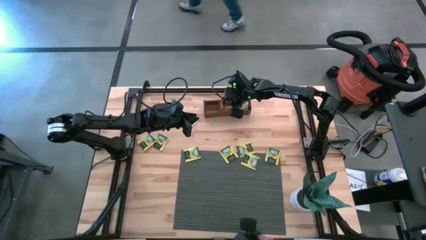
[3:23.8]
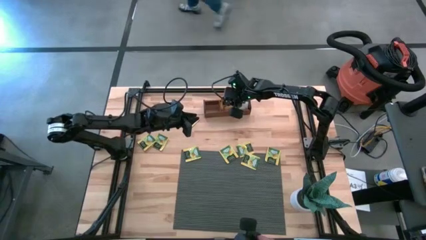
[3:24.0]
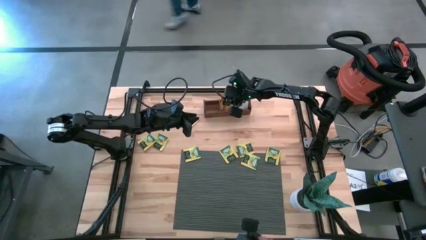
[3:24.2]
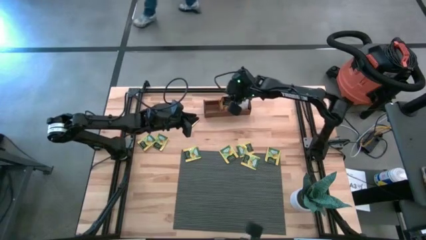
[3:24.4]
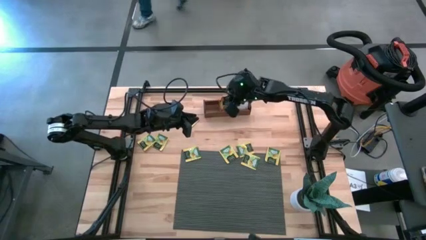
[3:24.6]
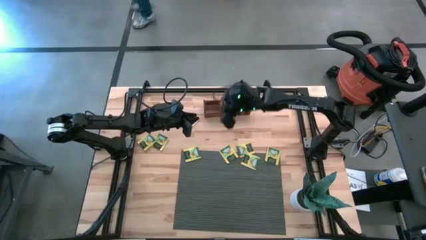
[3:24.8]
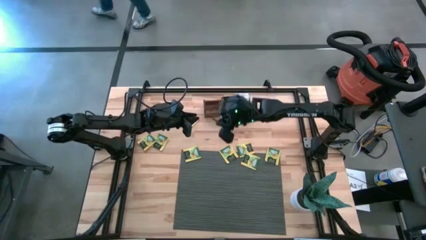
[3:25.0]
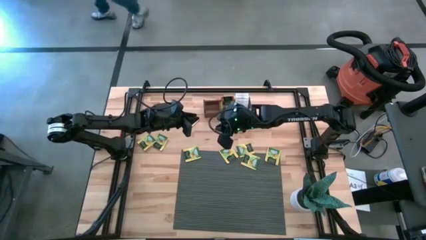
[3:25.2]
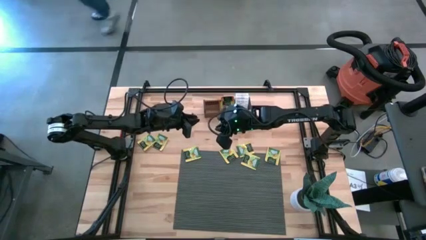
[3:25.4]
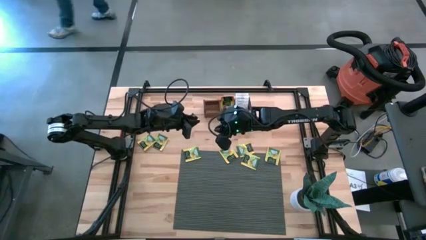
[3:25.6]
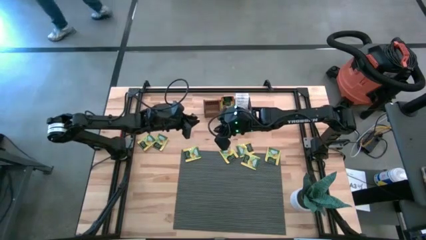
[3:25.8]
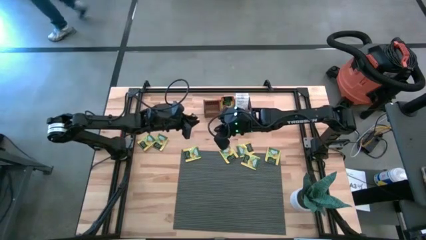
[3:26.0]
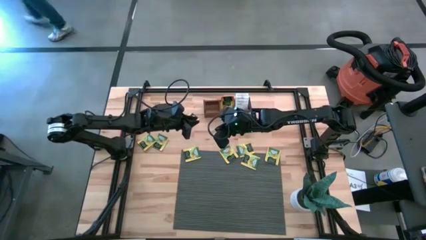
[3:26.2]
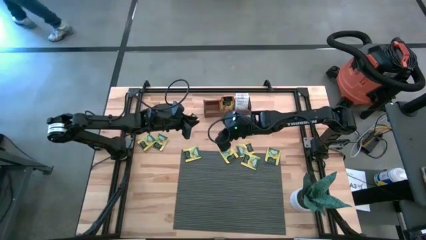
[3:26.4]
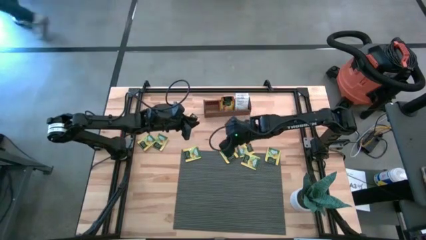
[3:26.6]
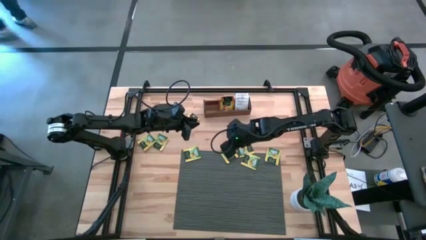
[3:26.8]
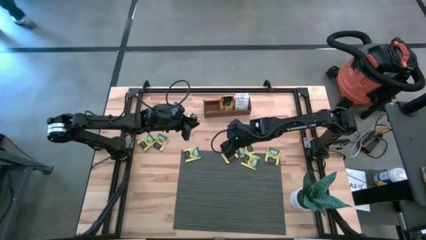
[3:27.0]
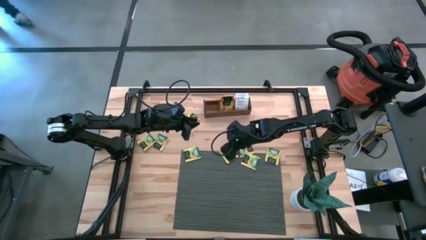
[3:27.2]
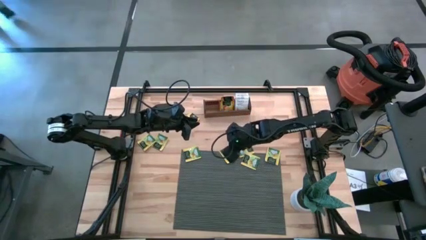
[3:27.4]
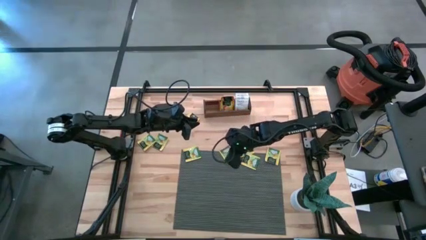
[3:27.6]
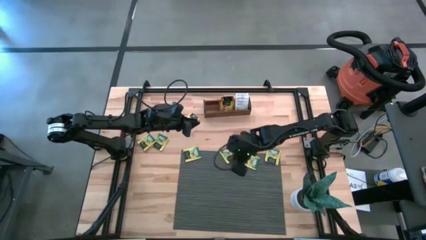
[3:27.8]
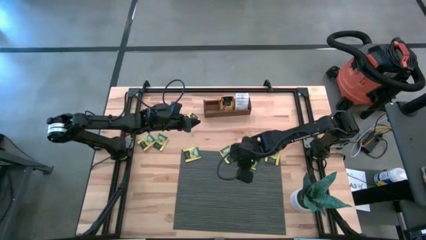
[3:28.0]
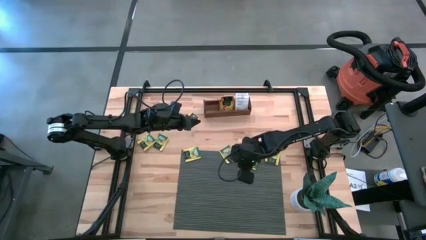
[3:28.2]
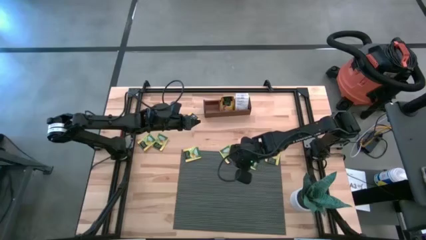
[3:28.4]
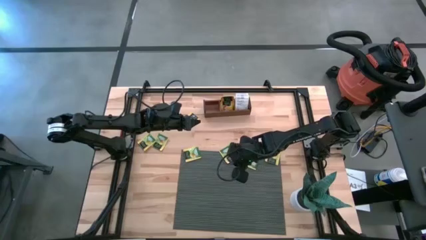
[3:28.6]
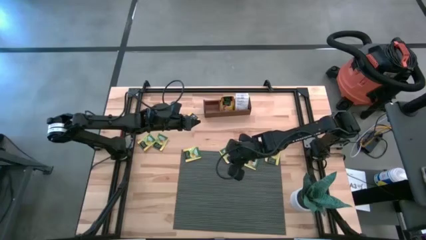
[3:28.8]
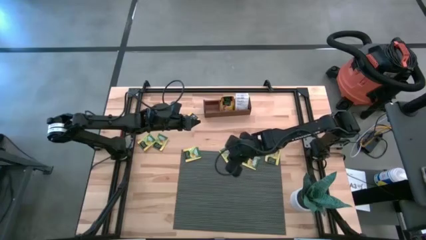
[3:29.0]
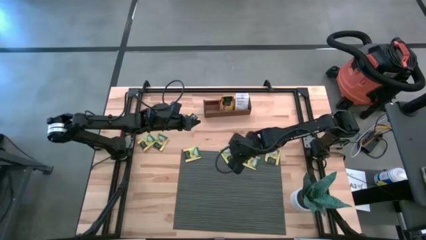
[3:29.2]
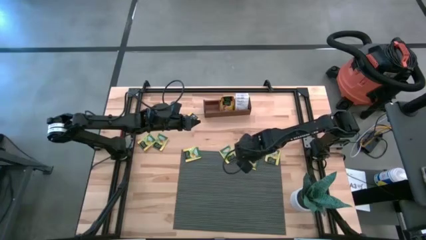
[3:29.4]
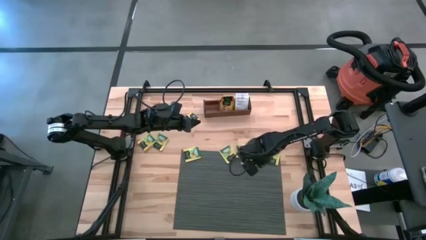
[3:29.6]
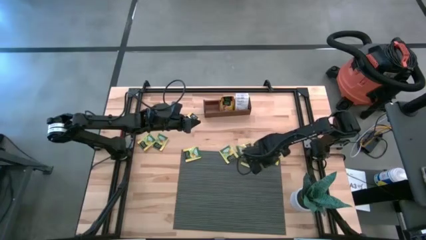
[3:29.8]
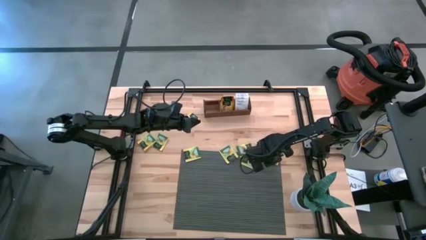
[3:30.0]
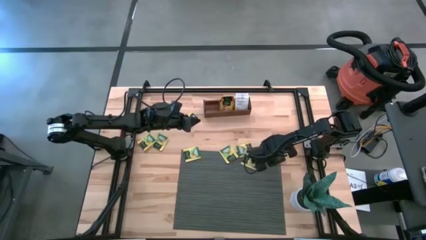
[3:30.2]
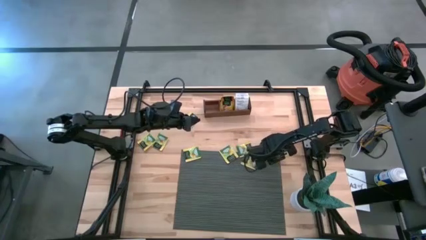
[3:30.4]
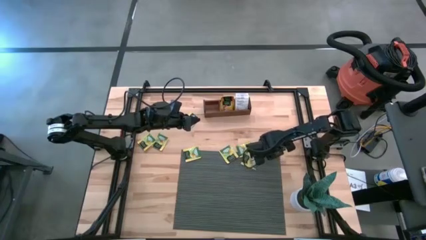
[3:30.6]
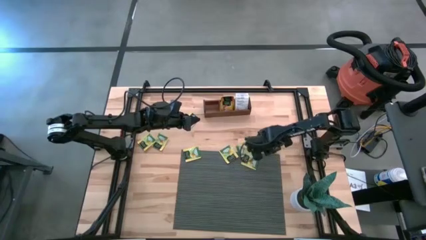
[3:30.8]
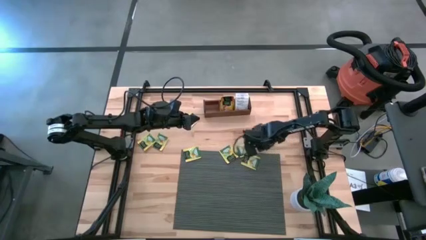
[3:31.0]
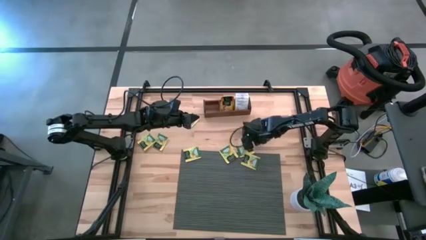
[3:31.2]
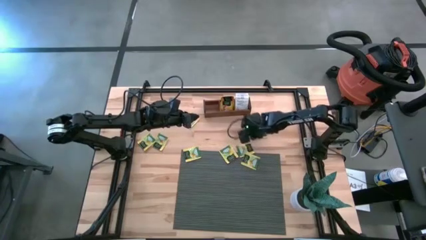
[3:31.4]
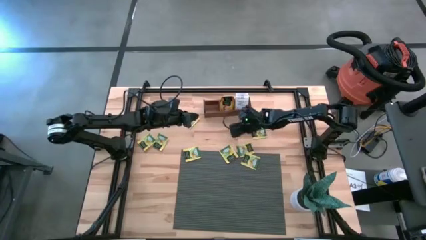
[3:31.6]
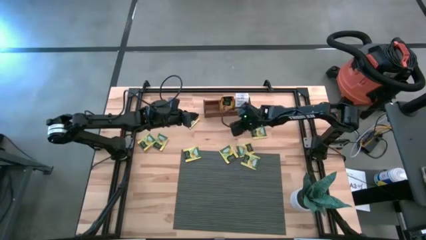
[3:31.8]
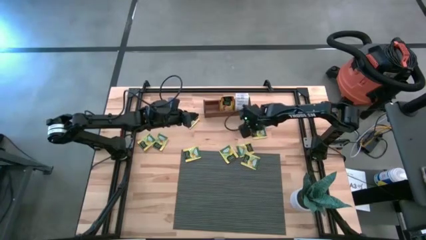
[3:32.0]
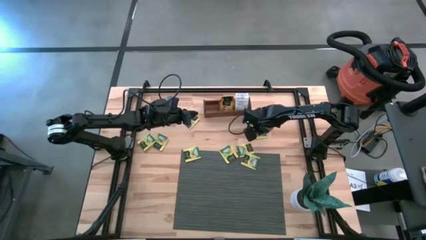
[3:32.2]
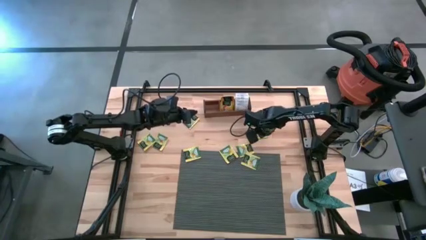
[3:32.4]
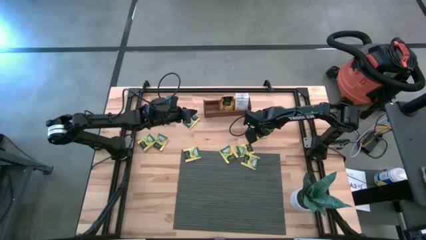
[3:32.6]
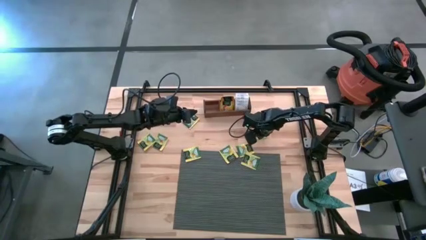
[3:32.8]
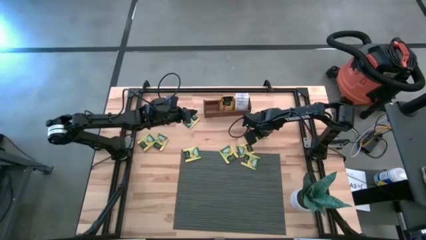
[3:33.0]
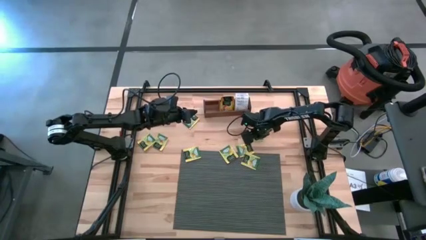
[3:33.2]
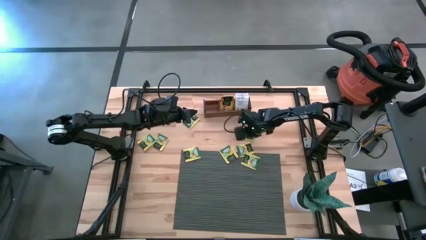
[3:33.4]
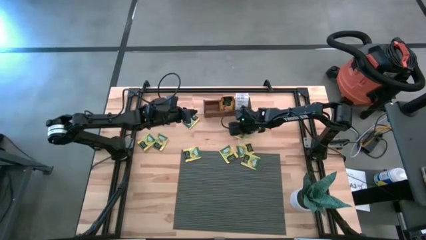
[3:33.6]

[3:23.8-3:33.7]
Task: Pick & Place Tea
Put the yellow tea bag into the left section of the wooden organizer

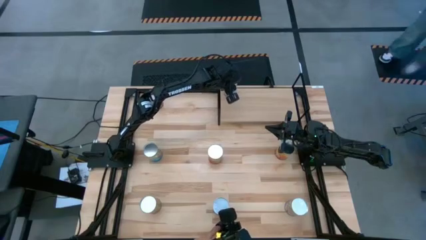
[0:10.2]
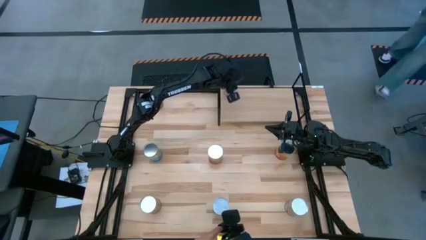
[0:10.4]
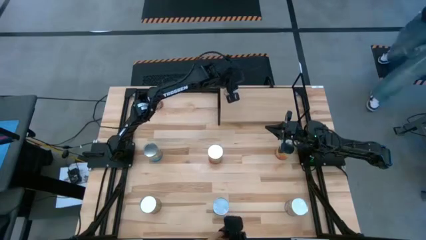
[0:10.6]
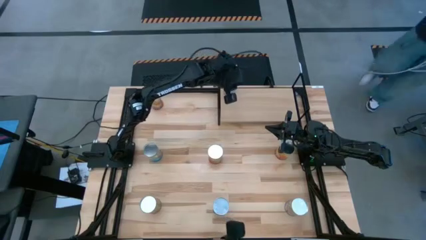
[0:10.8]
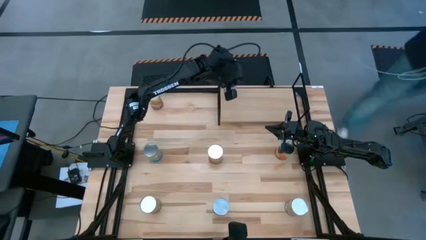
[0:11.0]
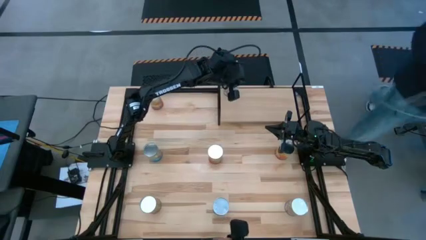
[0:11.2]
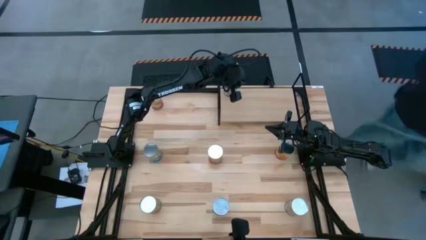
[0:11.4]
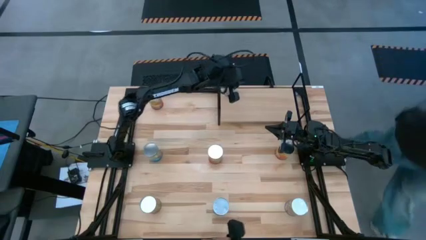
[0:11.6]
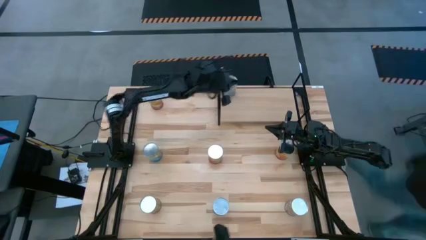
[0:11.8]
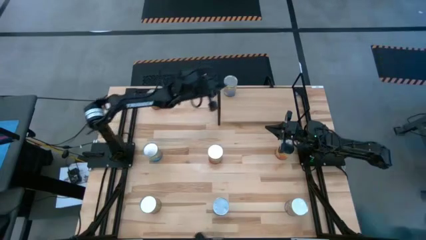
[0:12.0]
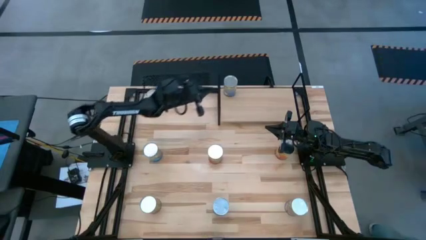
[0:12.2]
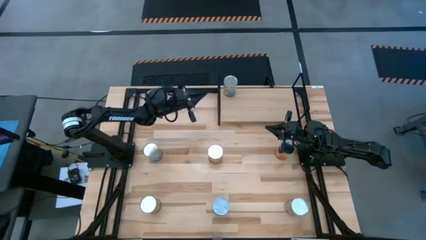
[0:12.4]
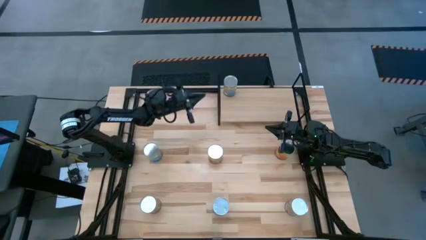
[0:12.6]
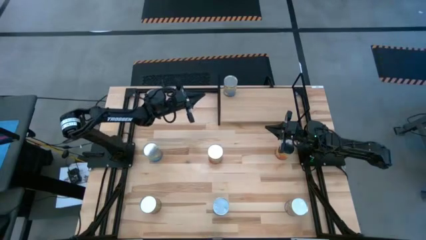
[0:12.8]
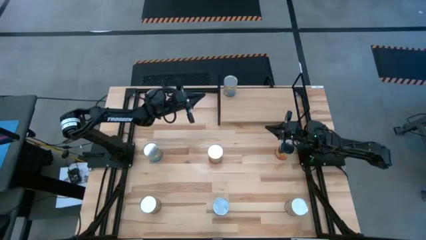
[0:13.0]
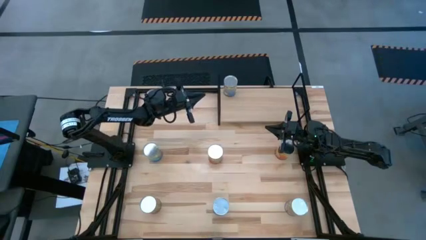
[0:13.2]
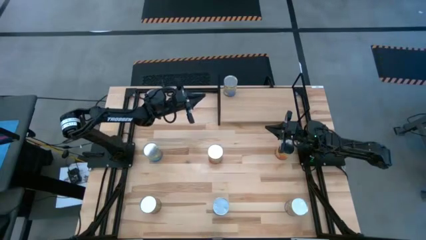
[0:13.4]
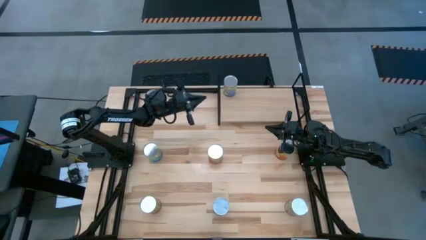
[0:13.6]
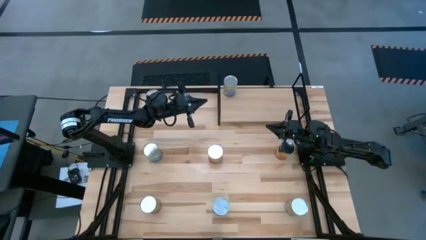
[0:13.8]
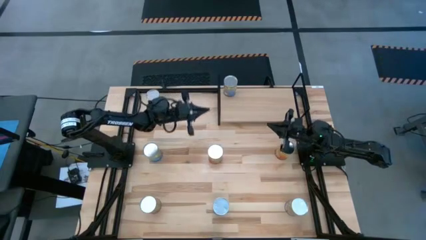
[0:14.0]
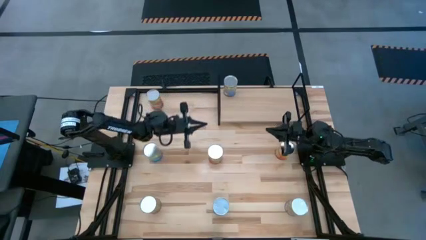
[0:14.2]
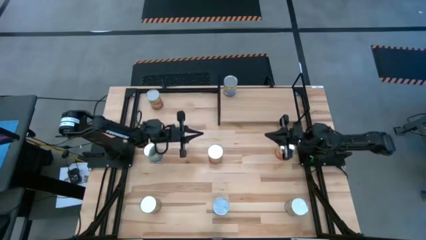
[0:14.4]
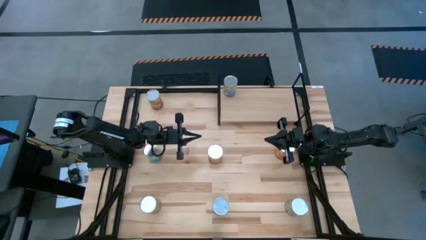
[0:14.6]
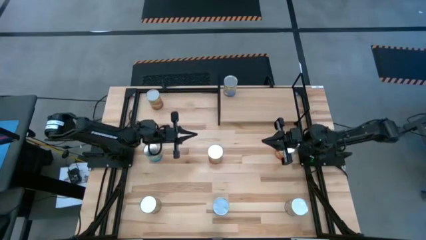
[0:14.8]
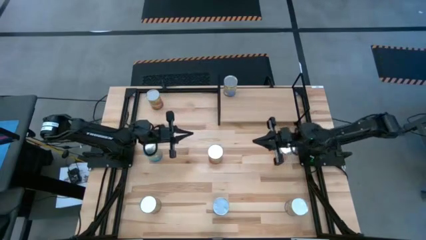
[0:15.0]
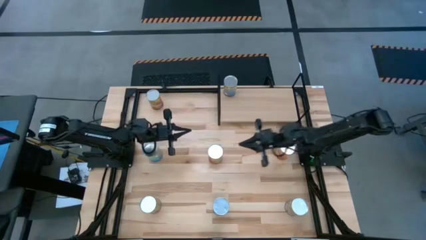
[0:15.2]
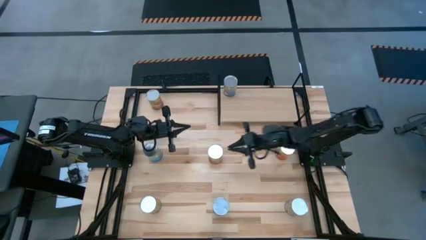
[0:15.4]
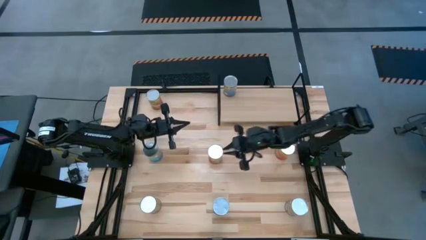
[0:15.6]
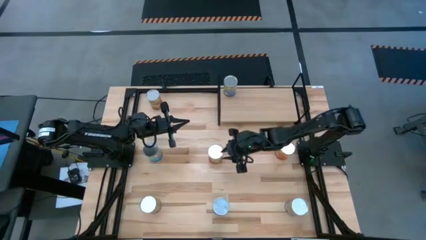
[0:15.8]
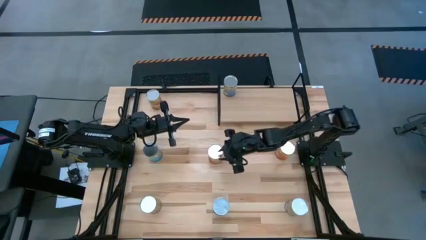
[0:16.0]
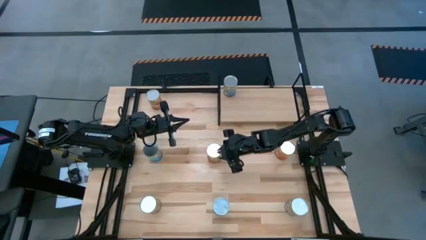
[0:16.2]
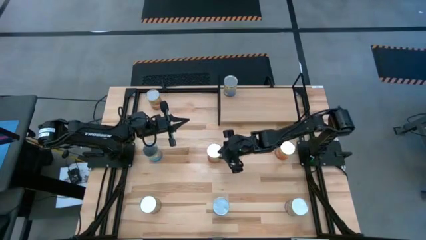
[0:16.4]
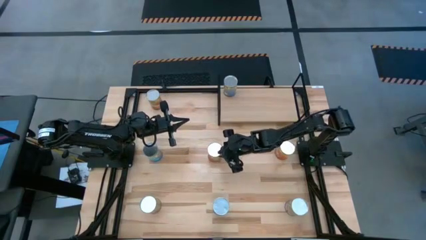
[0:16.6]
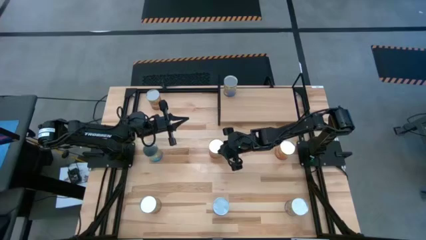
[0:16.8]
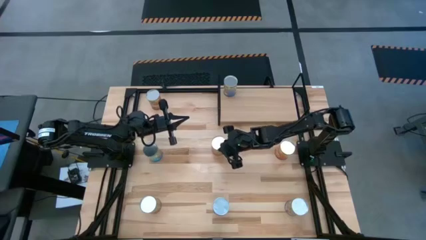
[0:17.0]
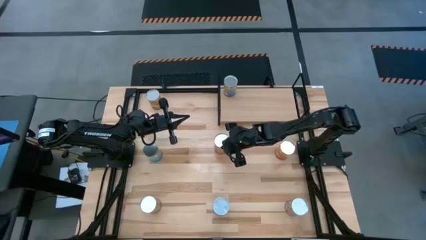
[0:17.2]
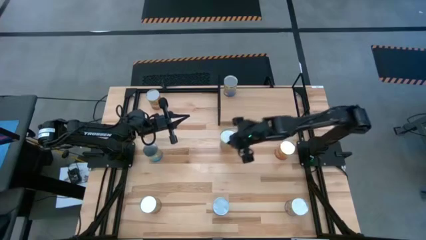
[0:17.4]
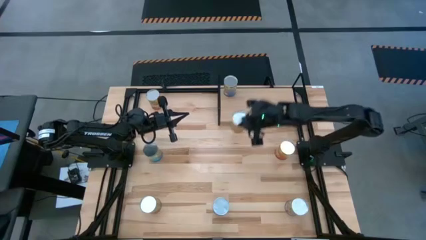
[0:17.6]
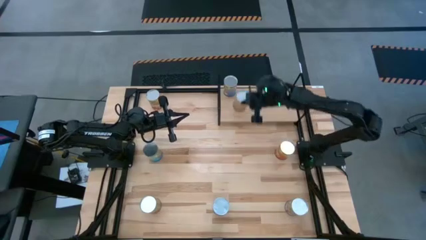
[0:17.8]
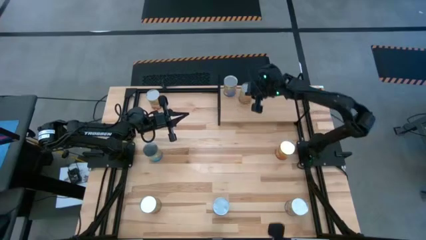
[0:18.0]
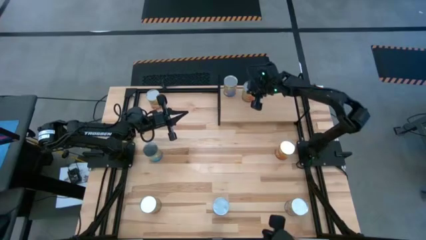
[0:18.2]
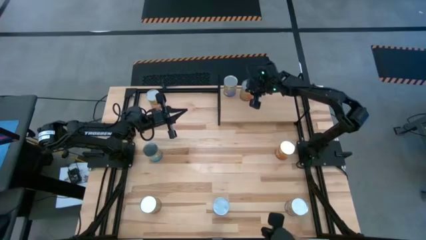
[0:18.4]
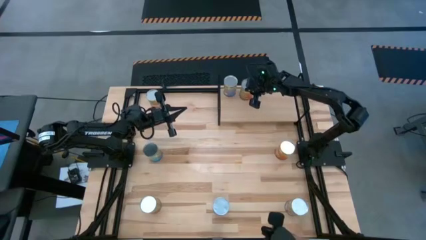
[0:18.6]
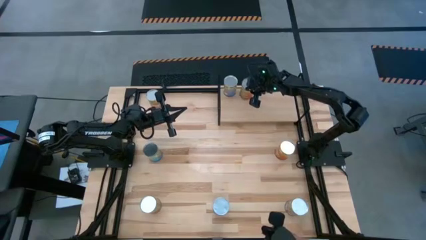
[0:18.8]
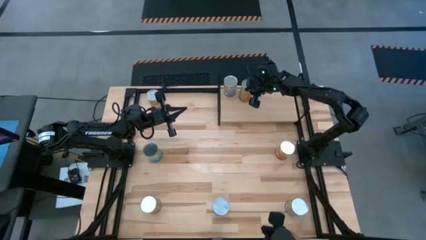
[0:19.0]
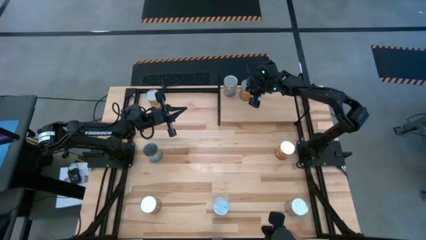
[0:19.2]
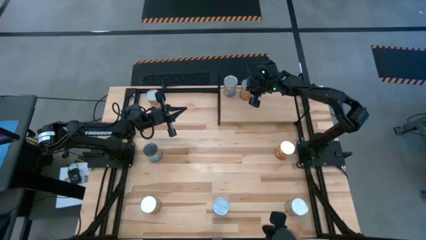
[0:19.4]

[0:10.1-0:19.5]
Task: Pick and place cans onto a shelf
Put the canned green beans on the shelf
